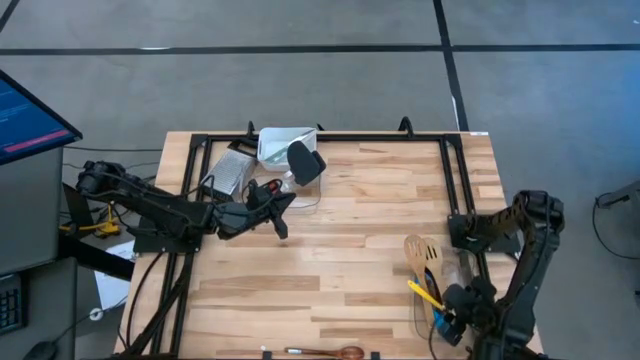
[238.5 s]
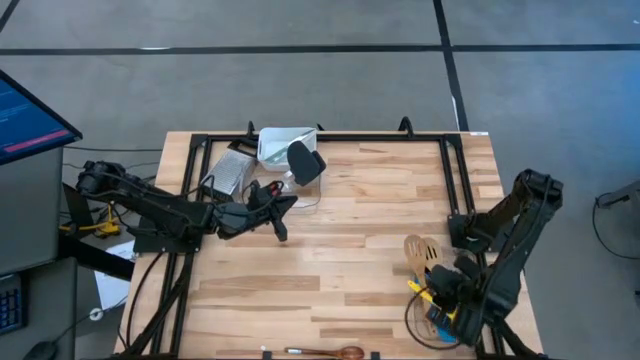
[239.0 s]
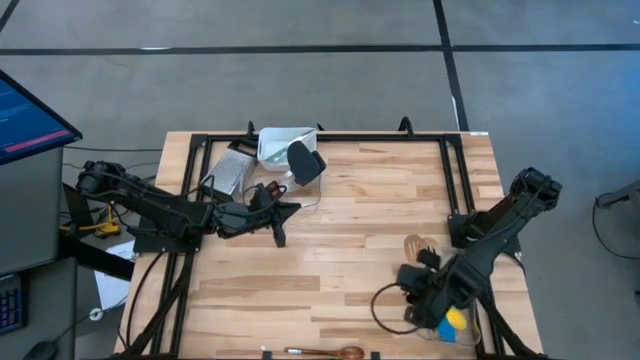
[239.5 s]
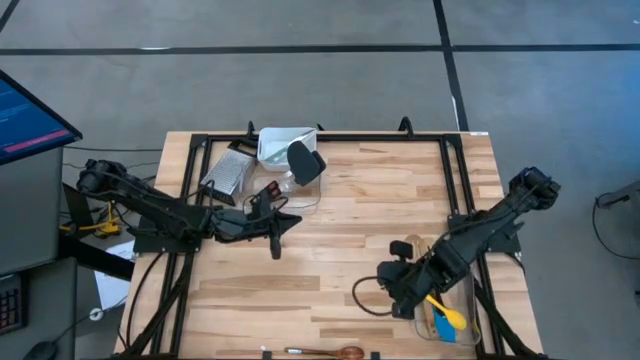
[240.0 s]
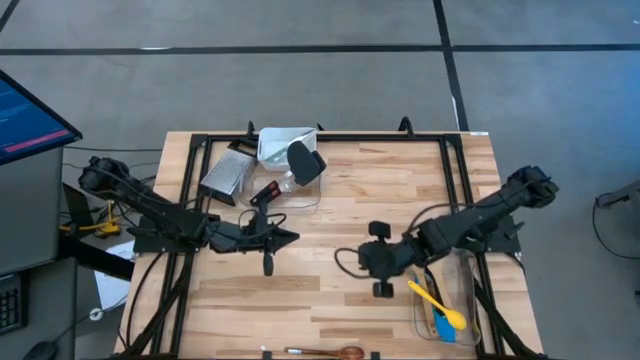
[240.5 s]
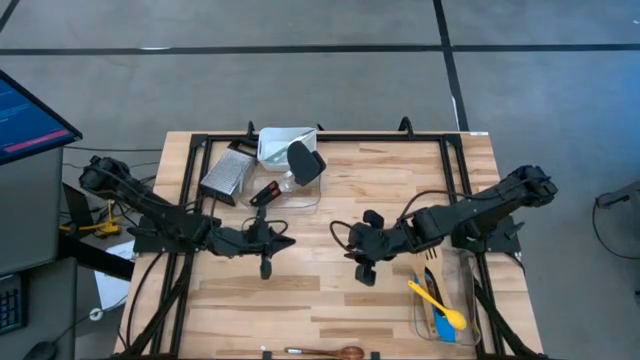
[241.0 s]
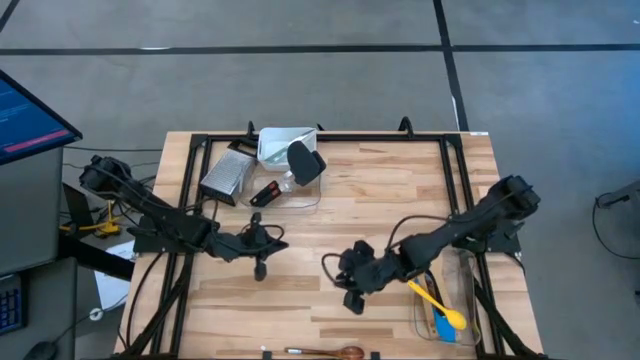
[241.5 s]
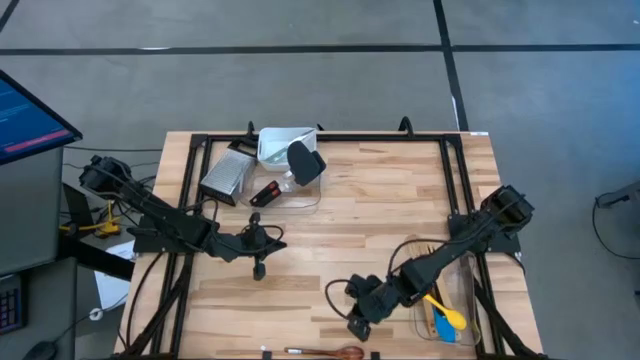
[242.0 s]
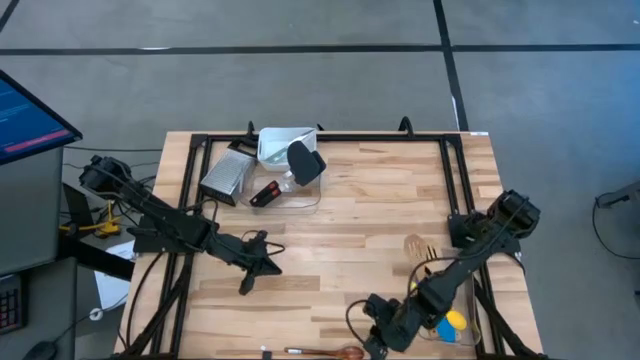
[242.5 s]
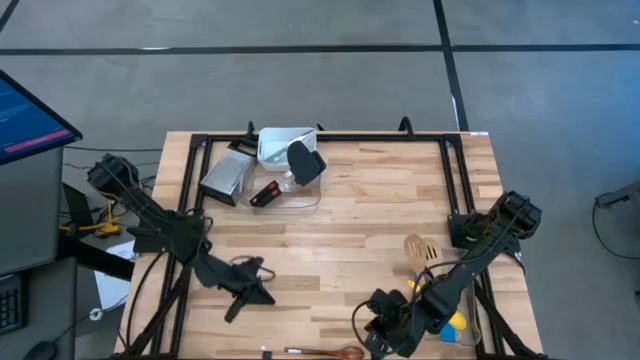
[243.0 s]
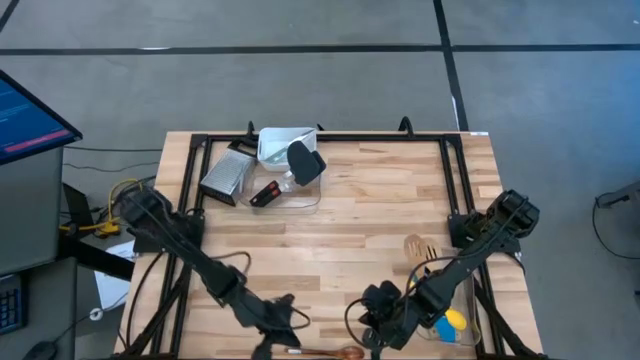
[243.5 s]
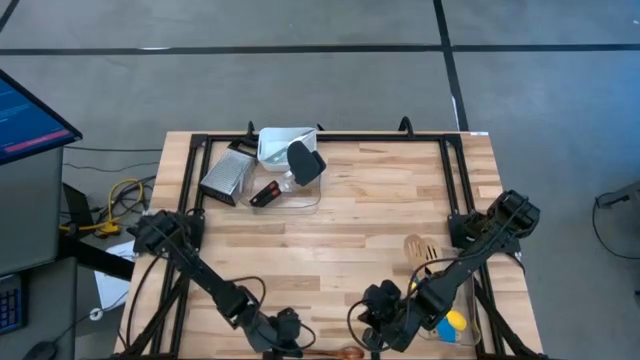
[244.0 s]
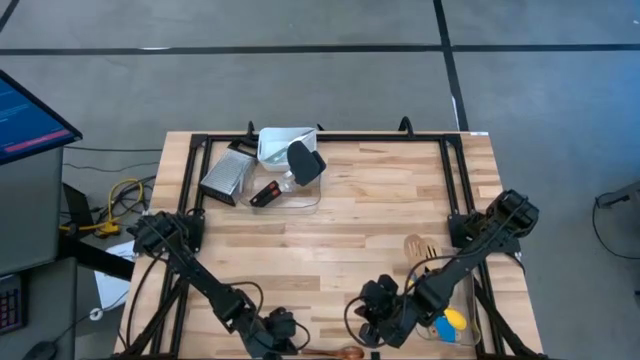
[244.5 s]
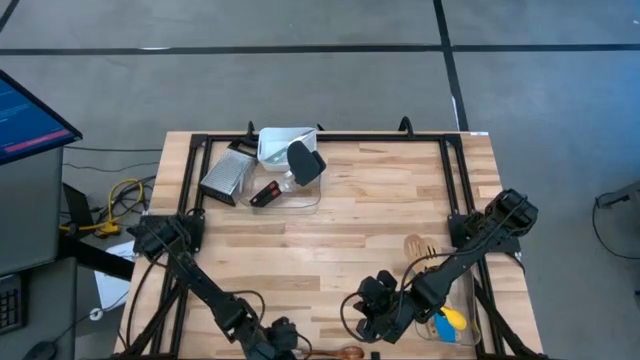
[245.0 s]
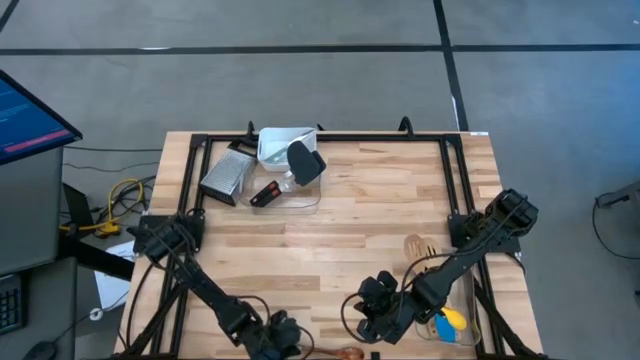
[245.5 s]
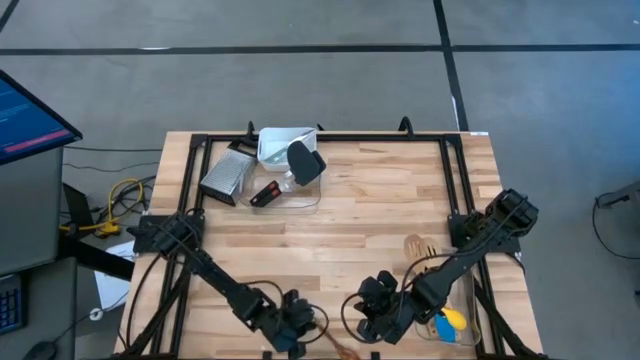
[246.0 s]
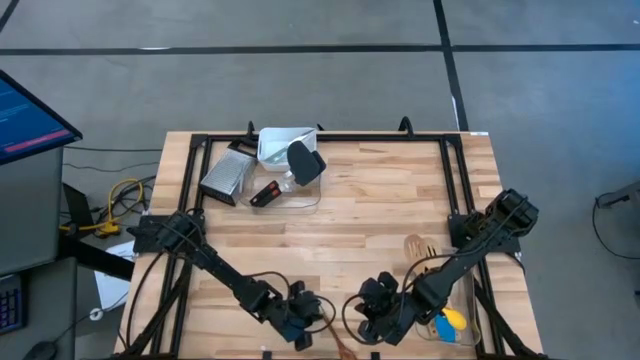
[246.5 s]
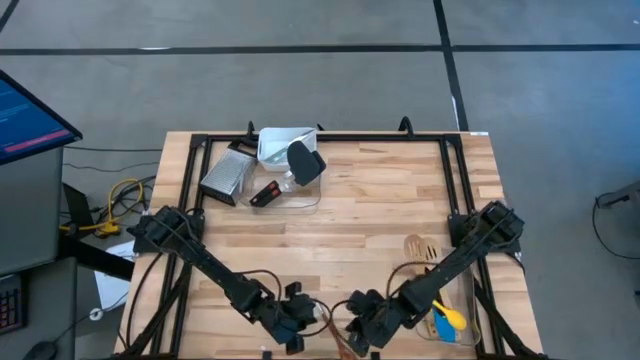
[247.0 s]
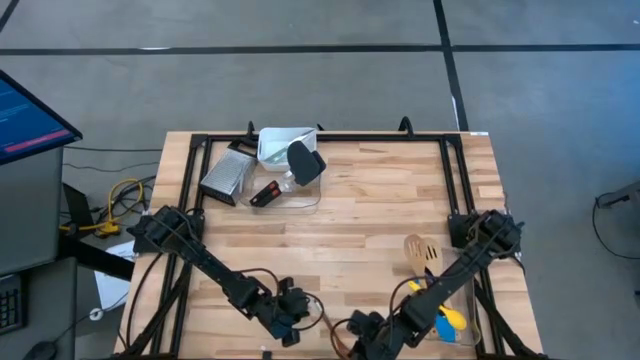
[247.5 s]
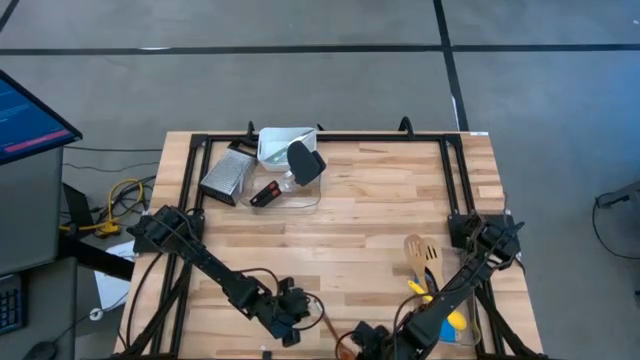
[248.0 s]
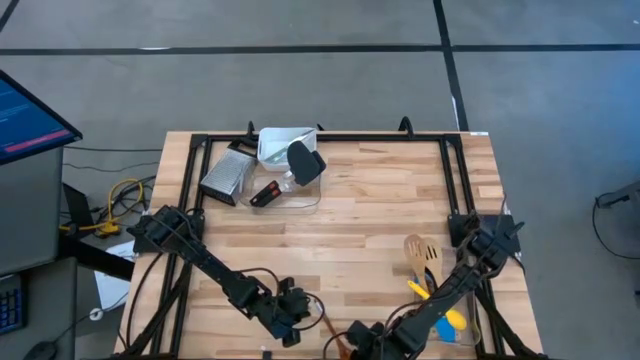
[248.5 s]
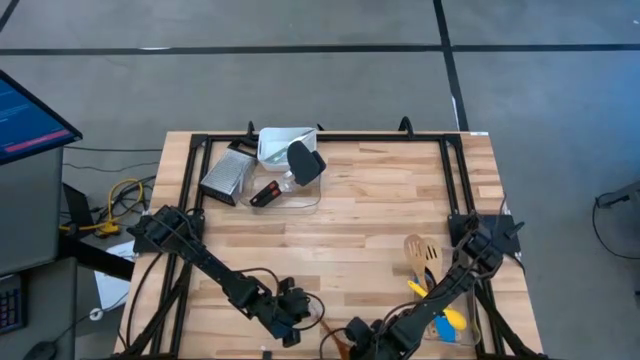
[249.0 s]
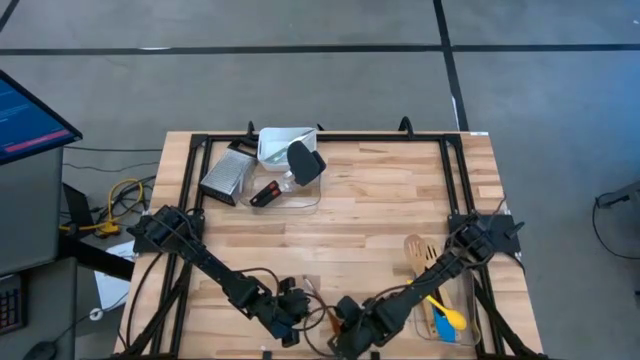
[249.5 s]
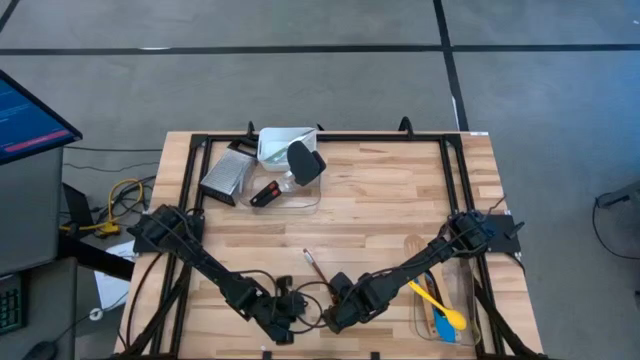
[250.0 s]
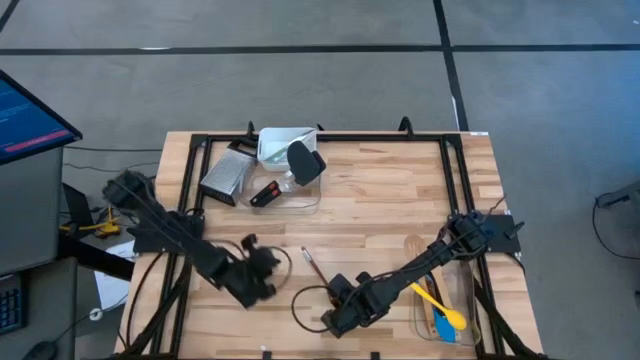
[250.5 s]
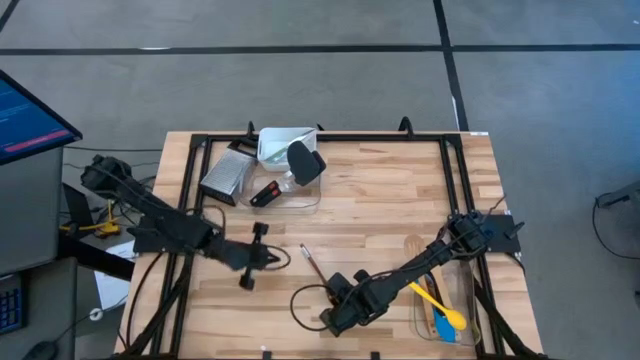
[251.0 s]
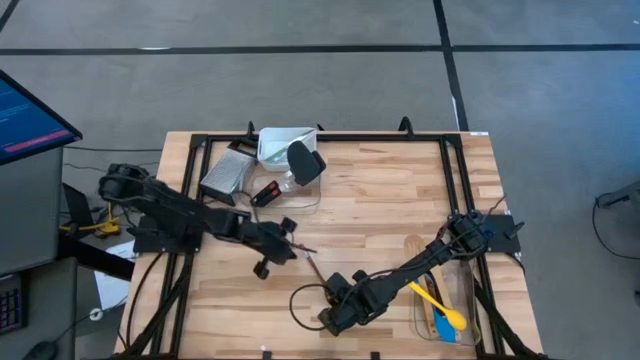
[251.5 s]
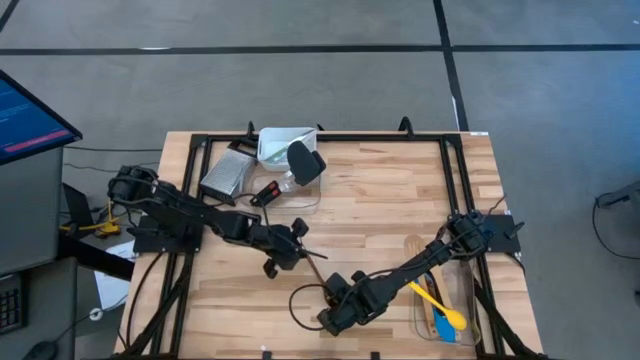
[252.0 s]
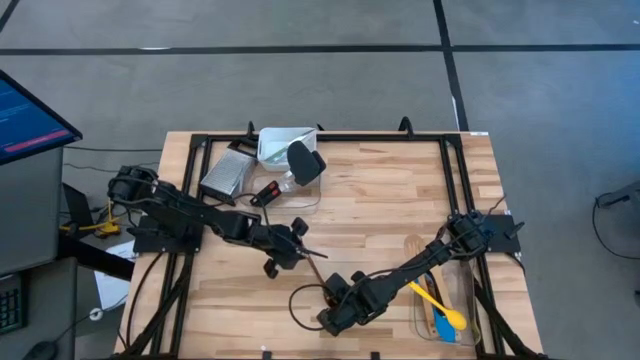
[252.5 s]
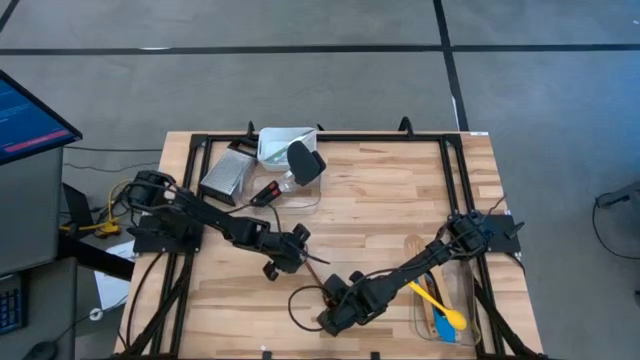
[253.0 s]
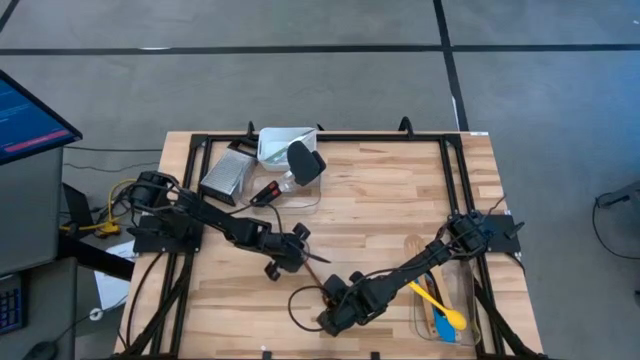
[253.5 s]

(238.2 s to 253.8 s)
Task: Pick & Place Kitchen Items
Put the wooden spoon into the bottom transparent bin

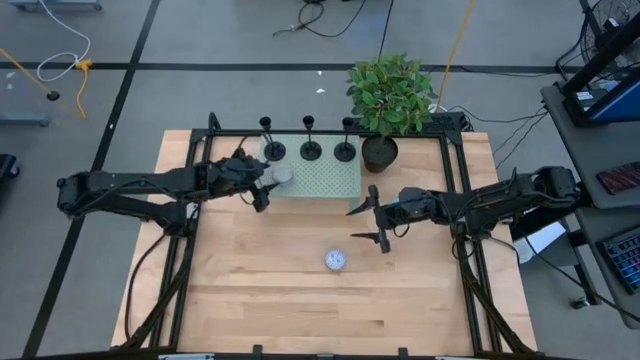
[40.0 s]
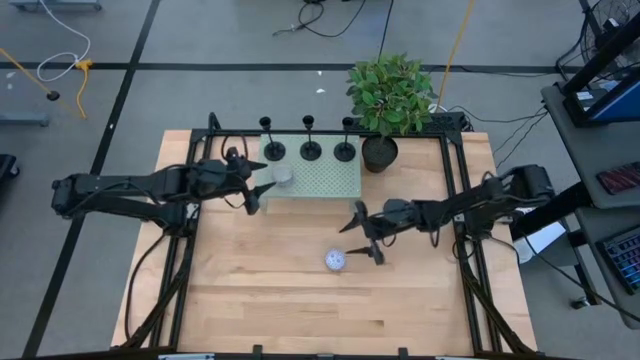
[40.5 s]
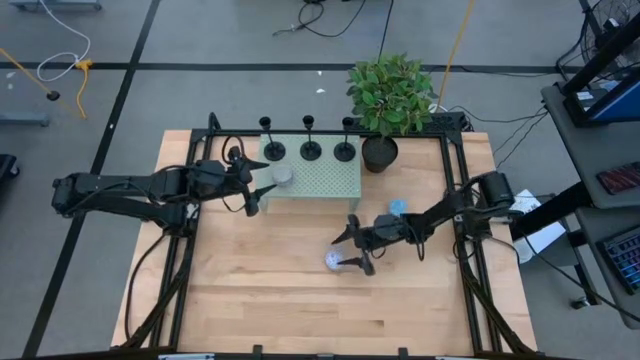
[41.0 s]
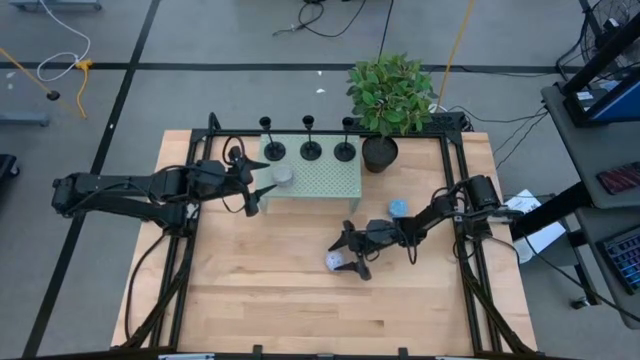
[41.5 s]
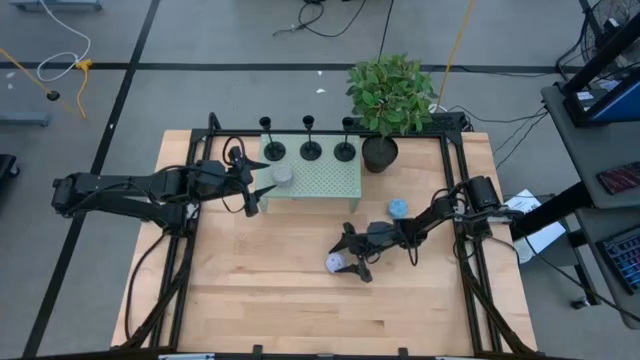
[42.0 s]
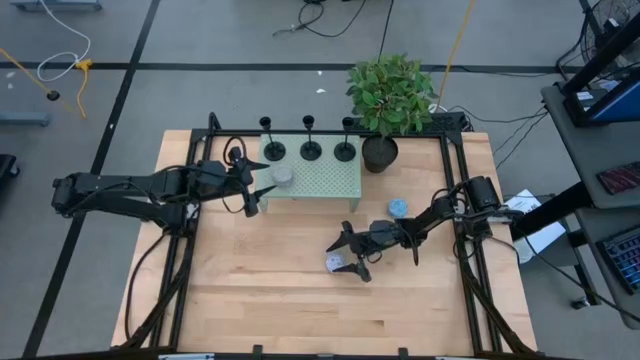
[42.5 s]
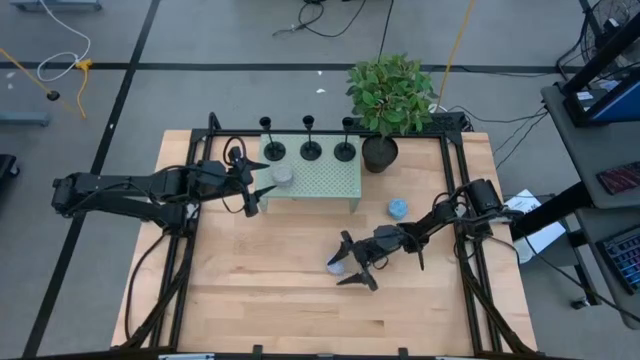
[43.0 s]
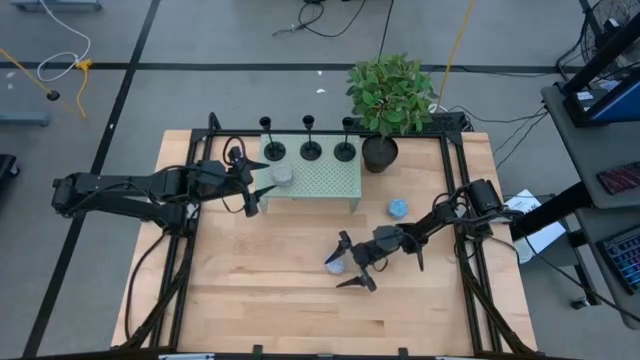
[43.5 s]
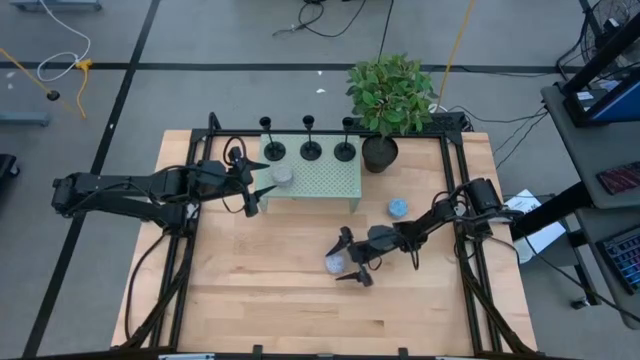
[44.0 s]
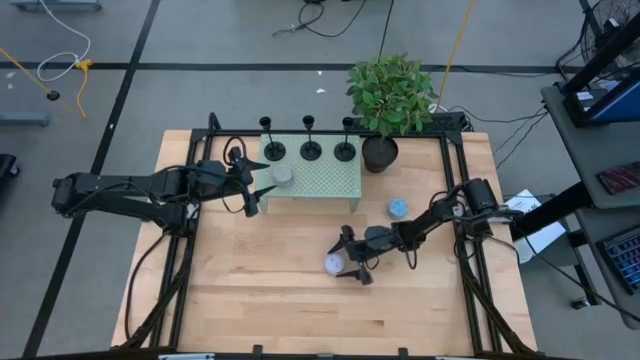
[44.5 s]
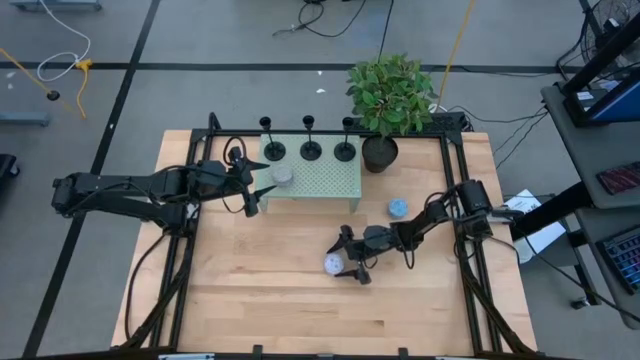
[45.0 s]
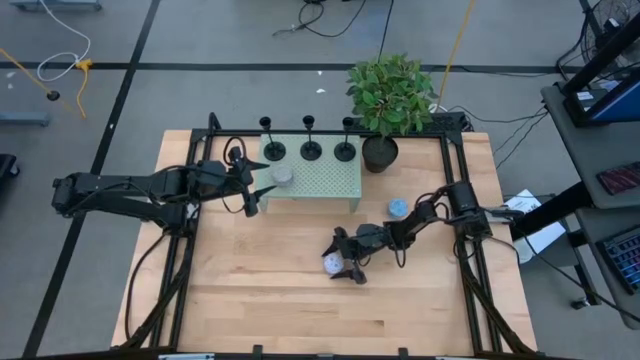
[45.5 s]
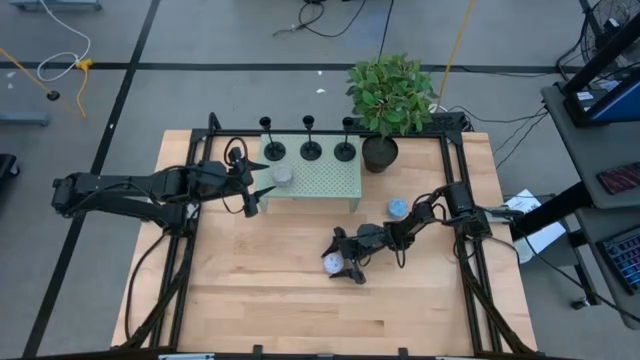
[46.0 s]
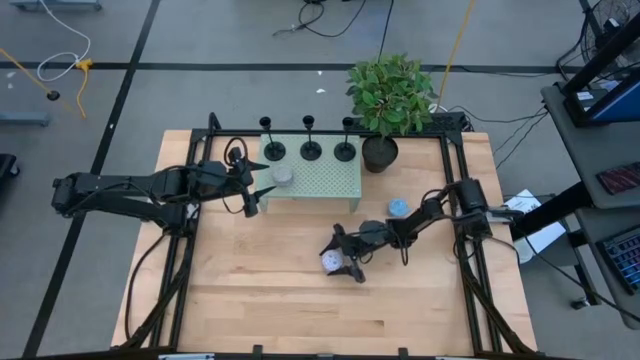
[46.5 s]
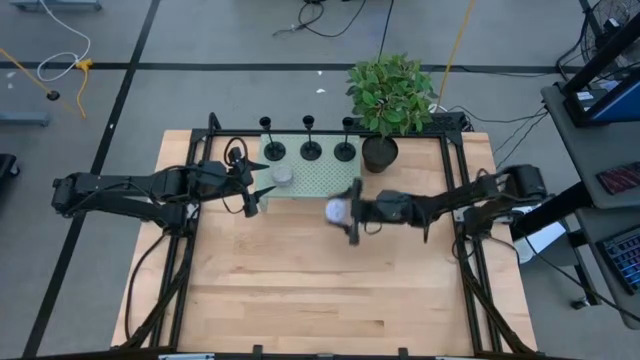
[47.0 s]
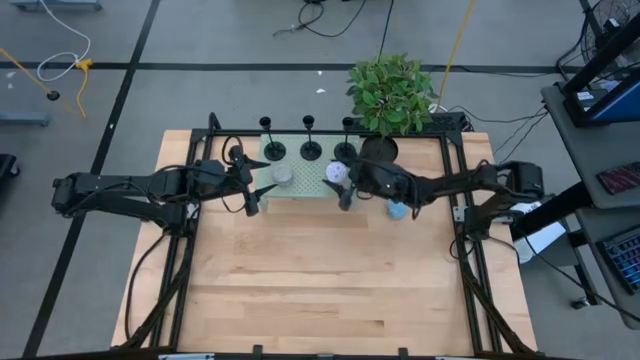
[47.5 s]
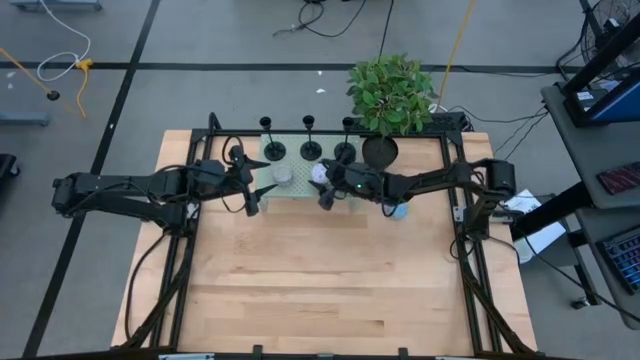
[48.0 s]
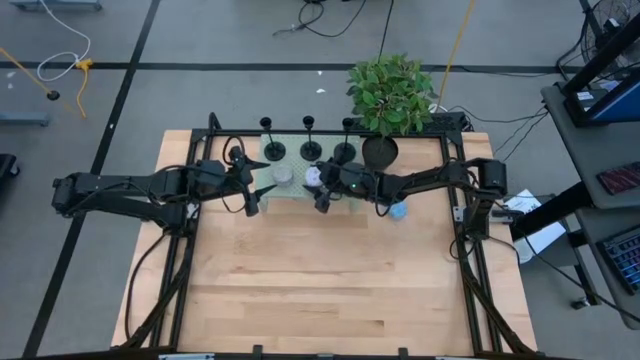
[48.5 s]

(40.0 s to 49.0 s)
Task: Pick & Place candle stick holders
Put the white scented candle on the shelf
